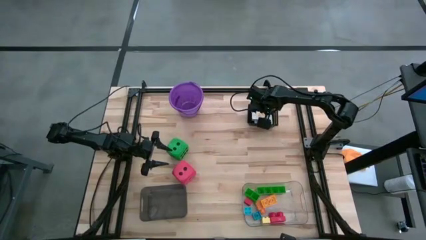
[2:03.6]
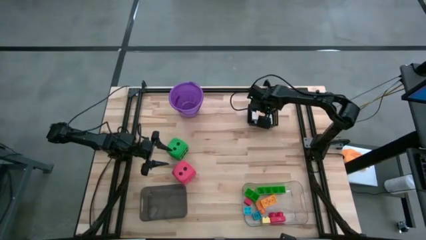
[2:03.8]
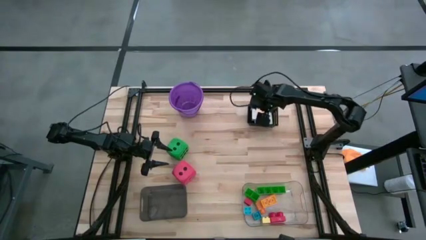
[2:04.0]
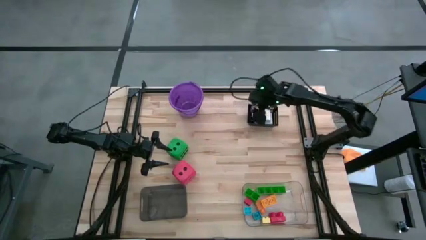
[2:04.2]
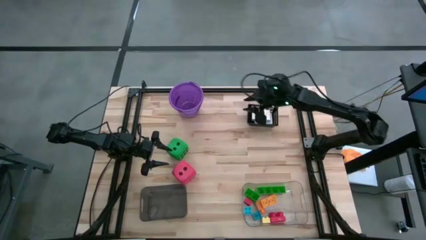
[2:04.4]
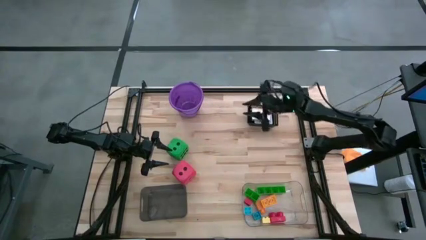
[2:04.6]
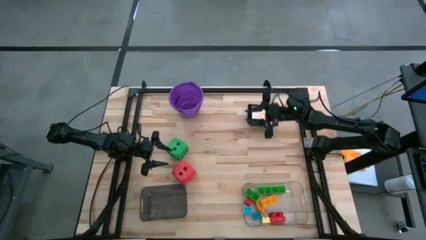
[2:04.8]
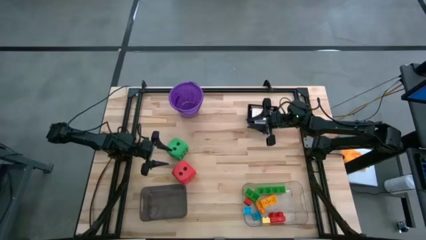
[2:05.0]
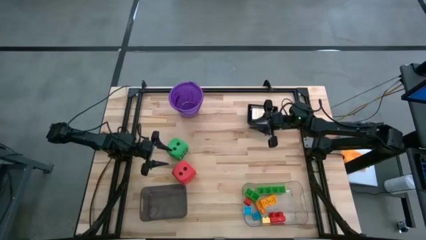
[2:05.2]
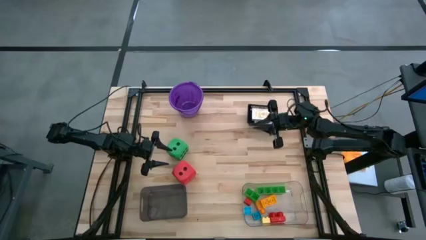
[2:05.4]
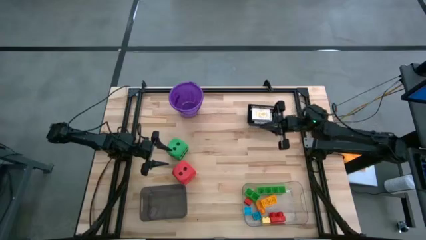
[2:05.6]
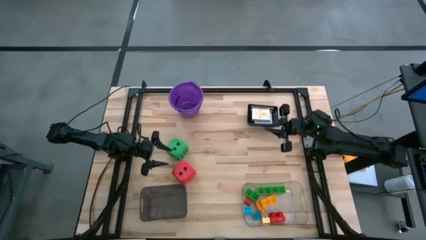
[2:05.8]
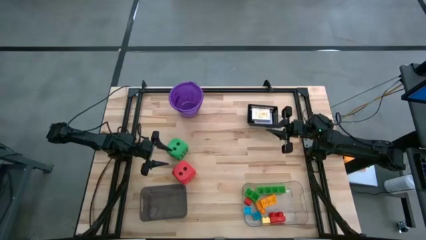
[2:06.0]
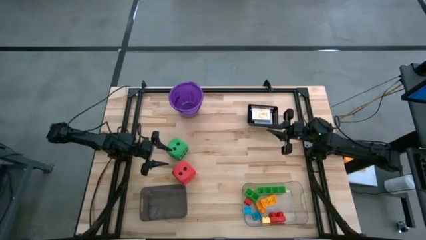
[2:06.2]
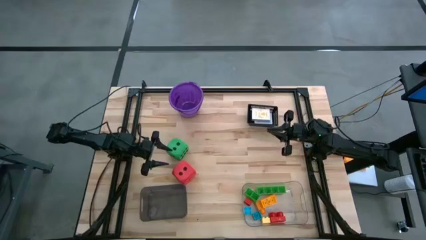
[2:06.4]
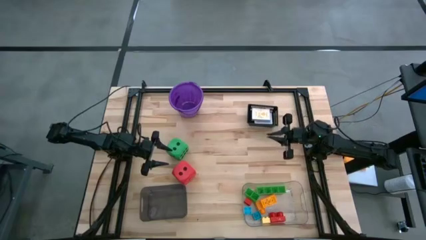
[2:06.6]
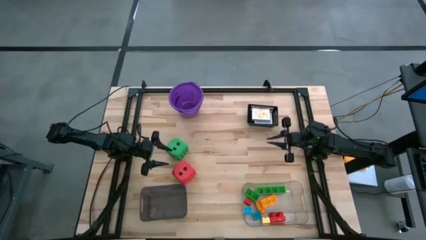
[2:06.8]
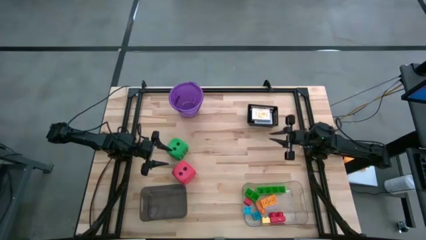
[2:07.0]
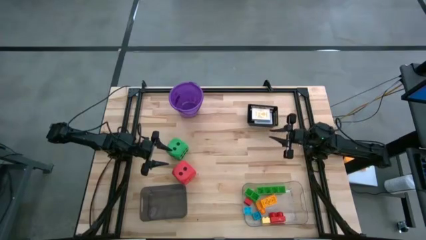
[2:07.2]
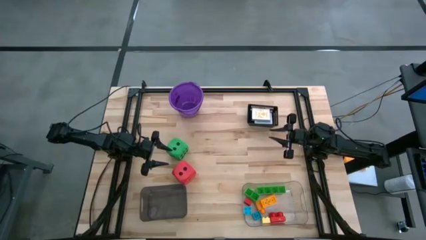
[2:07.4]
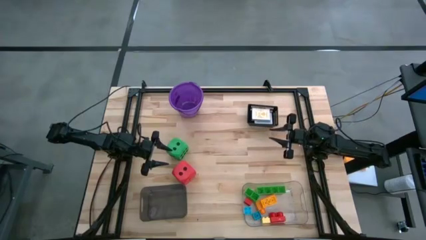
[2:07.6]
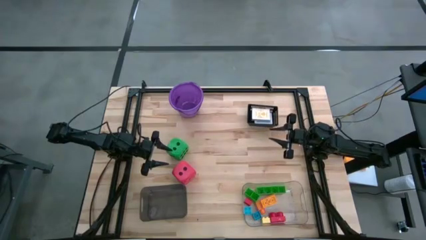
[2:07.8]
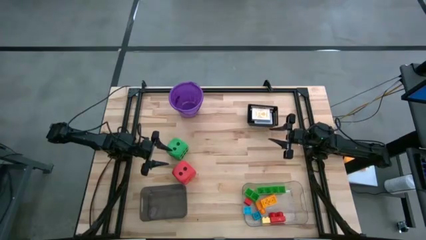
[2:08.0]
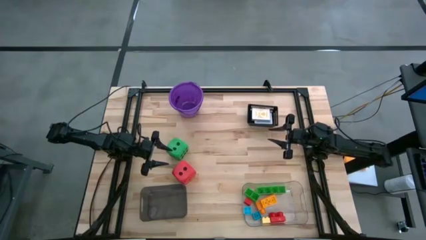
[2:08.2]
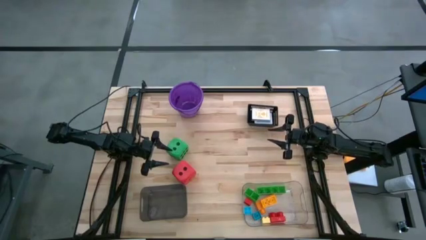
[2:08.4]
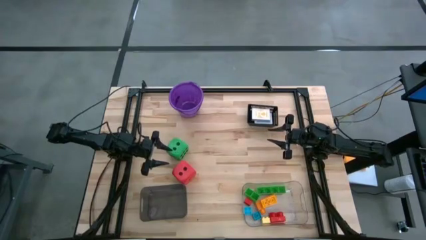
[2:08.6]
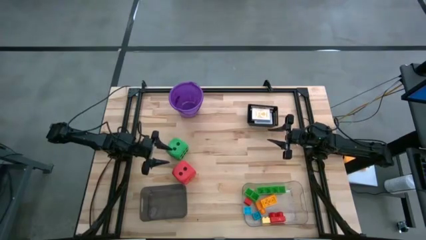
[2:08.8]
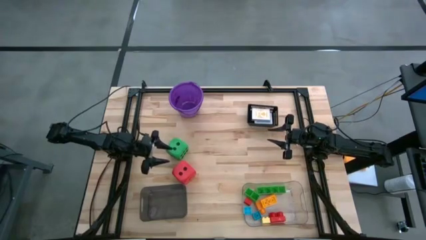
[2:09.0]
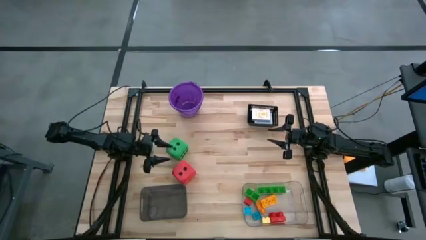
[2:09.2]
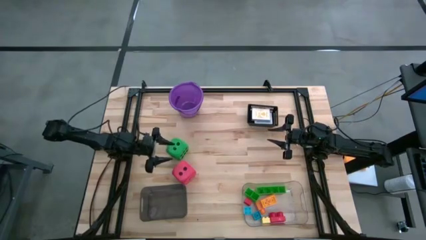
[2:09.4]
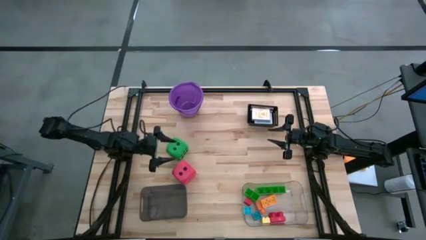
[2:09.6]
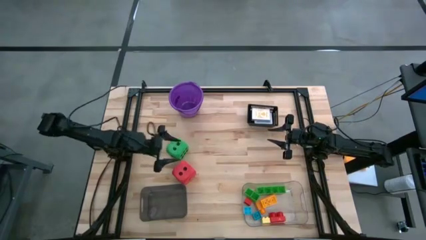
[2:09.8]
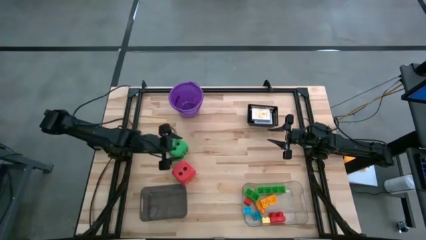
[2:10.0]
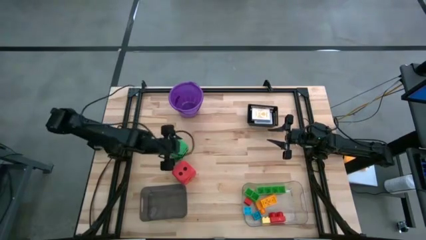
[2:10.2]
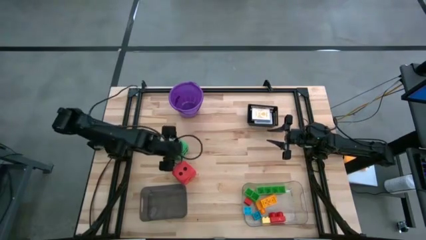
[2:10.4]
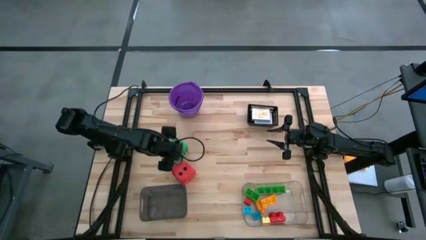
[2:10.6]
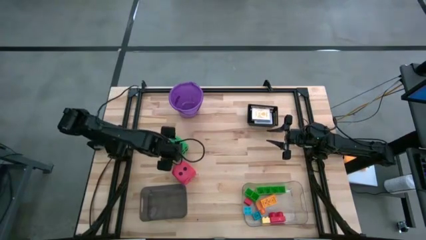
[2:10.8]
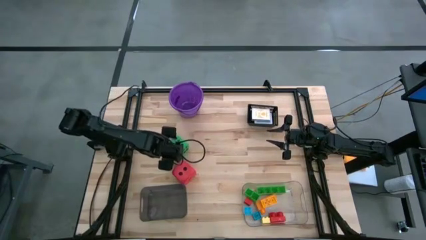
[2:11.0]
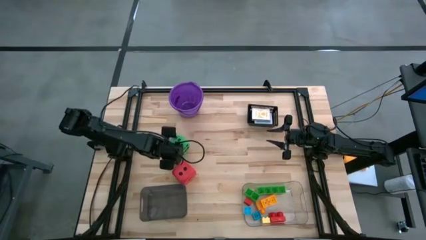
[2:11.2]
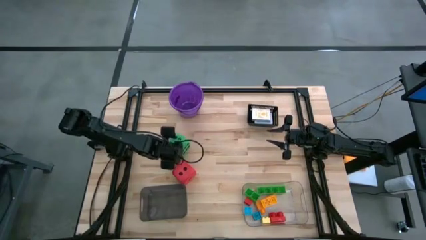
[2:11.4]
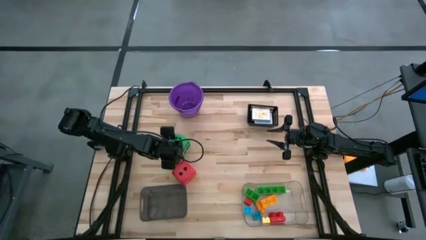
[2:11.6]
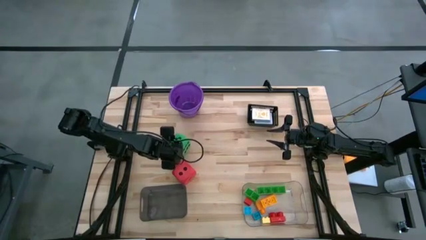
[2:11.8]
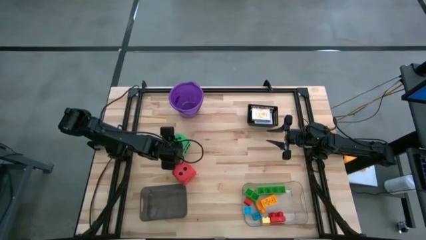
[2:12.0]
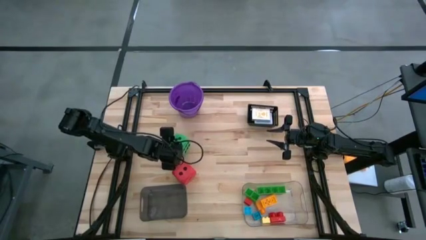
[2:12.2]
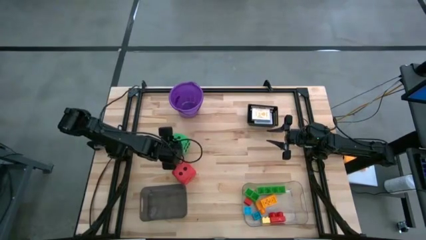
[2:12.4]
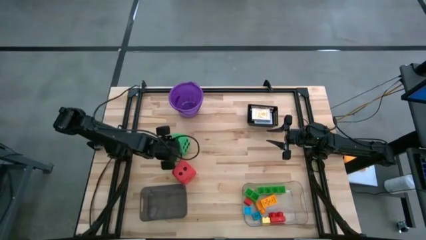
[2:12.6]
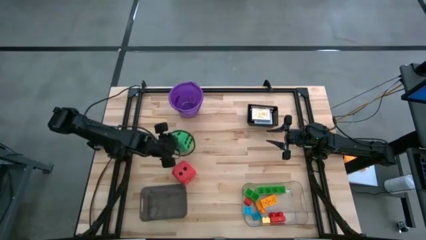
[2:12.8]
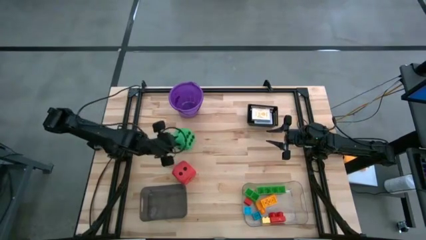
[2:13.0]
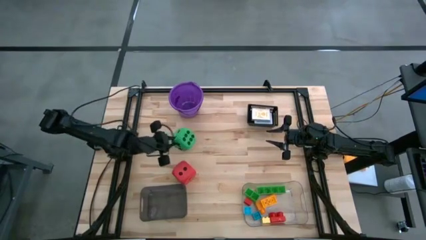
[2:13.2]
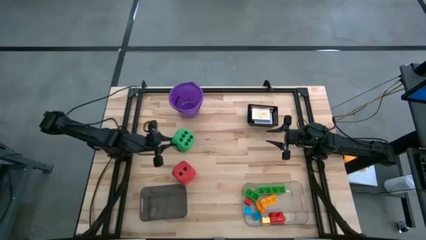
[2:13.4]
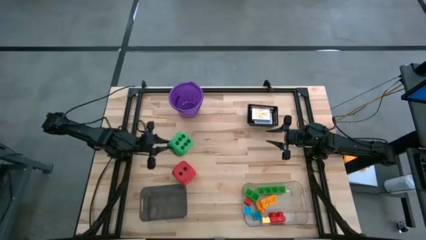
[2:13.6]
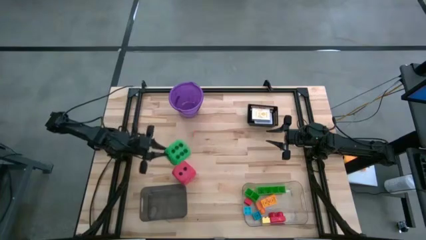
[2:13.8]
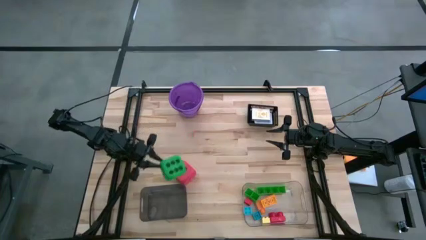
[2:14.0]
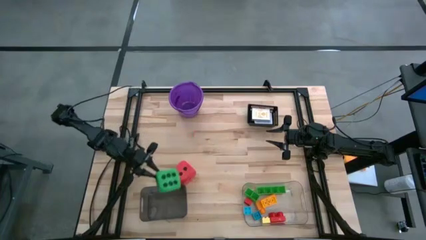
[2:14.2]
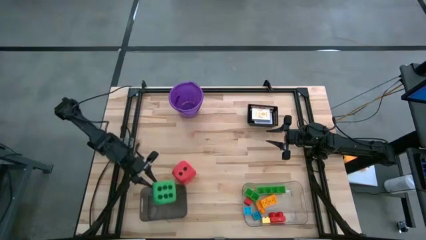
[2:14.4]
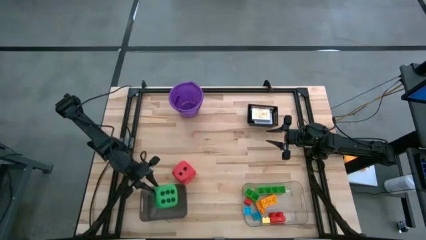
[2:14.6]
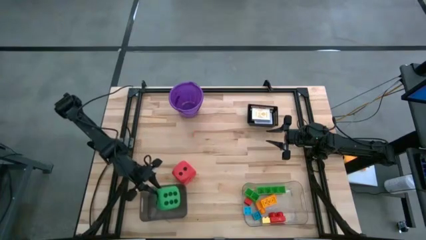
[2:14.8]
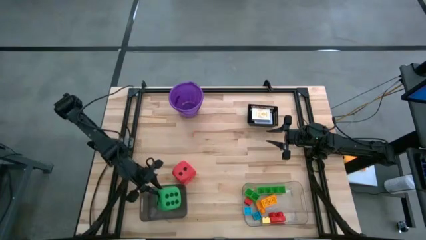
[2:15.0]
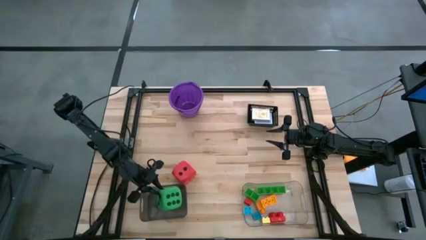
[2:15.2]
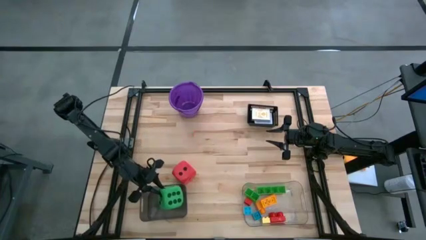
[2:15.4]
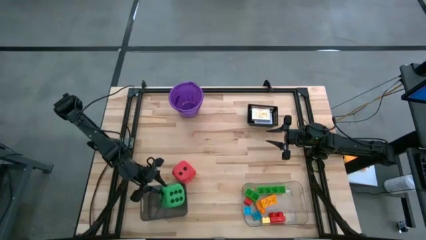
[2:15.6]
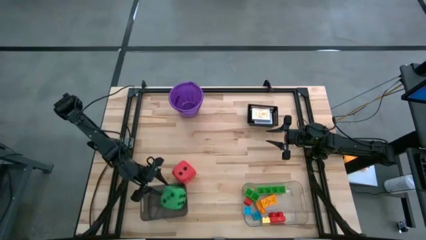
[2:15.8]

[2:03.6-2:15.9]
Task: Pick & Place Toys
Put the green dice into the black bin

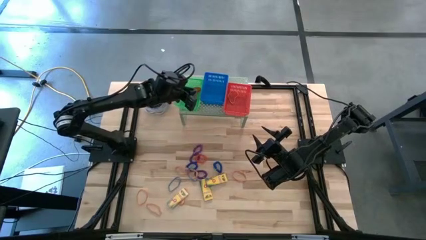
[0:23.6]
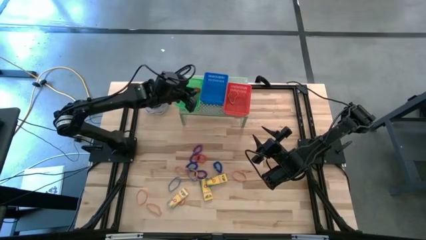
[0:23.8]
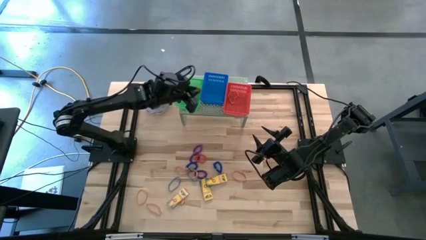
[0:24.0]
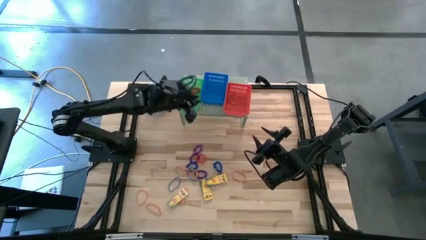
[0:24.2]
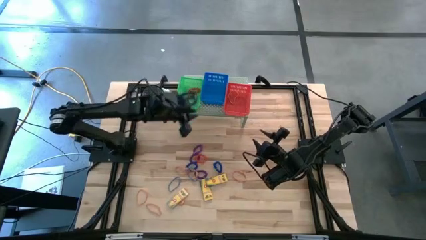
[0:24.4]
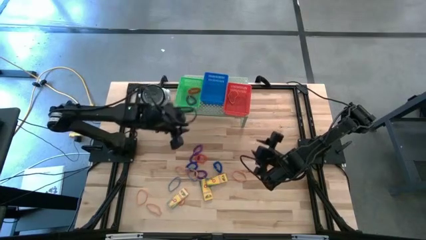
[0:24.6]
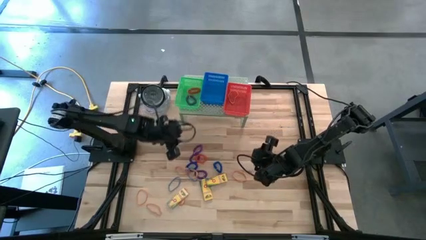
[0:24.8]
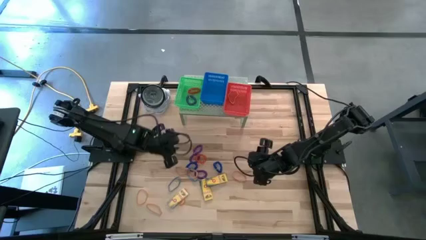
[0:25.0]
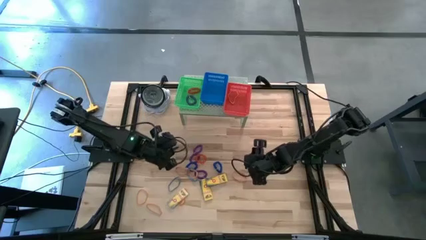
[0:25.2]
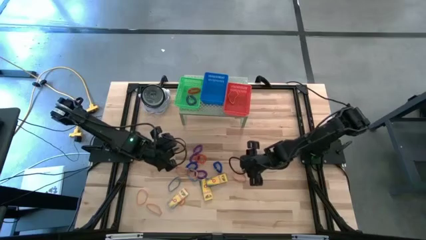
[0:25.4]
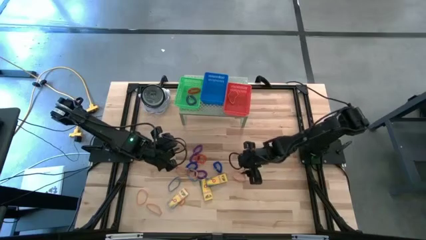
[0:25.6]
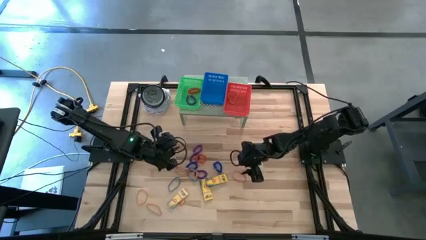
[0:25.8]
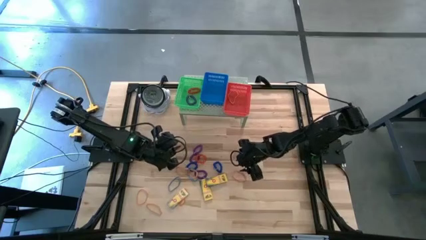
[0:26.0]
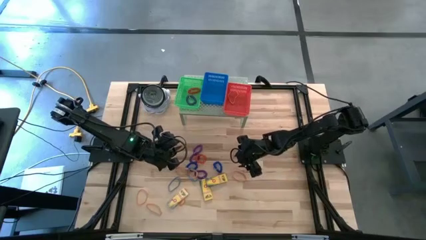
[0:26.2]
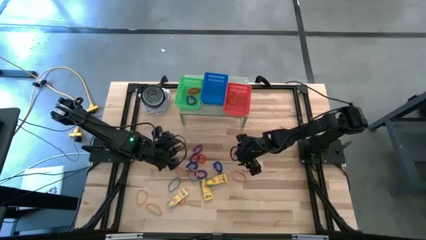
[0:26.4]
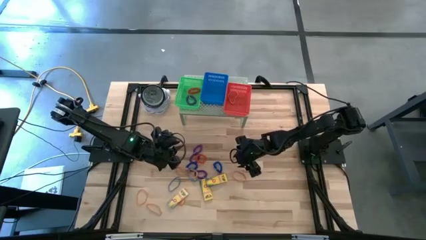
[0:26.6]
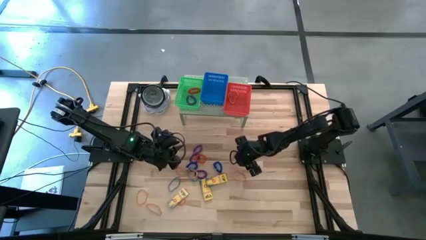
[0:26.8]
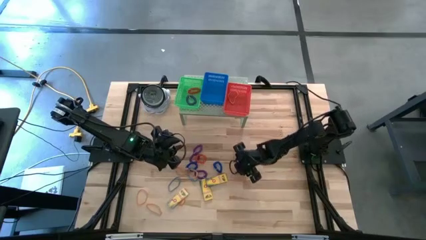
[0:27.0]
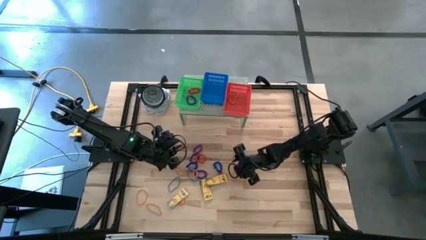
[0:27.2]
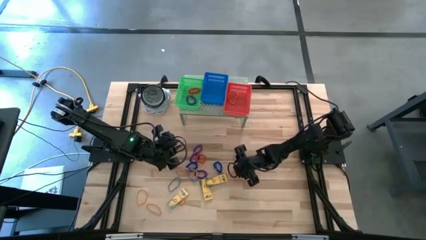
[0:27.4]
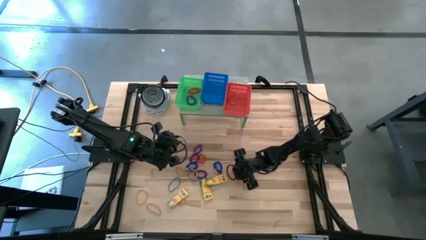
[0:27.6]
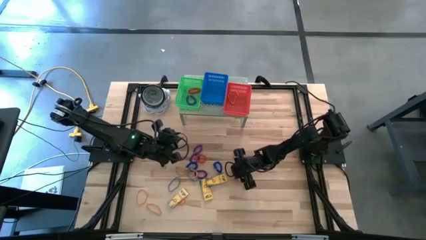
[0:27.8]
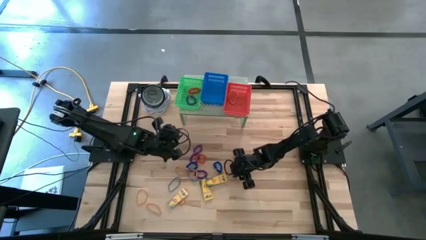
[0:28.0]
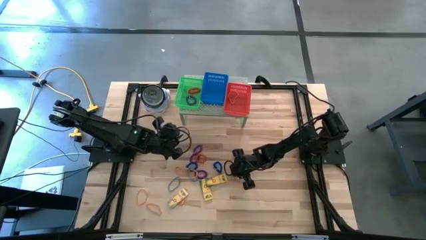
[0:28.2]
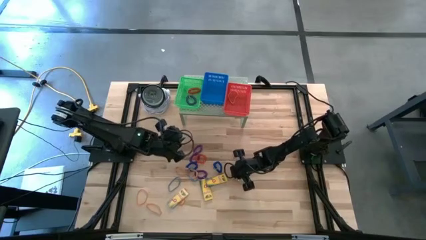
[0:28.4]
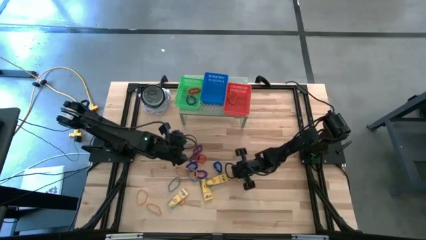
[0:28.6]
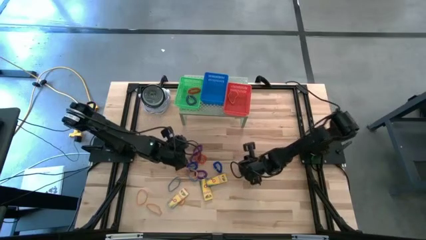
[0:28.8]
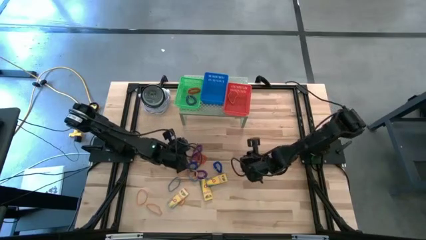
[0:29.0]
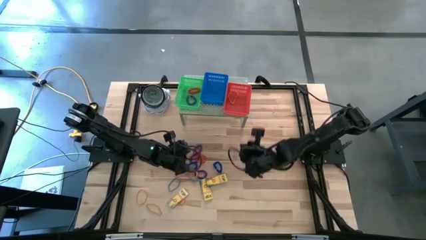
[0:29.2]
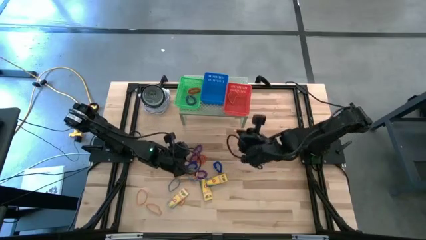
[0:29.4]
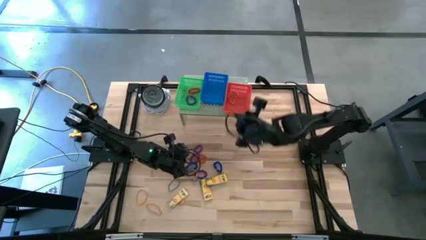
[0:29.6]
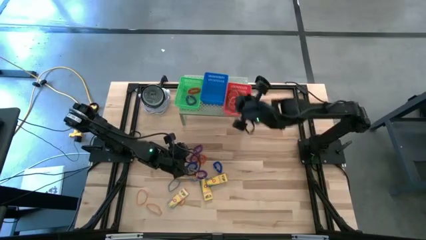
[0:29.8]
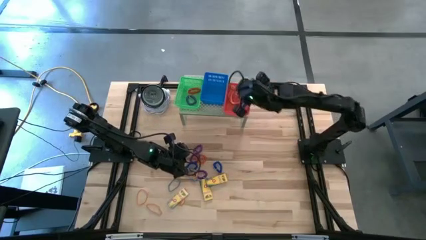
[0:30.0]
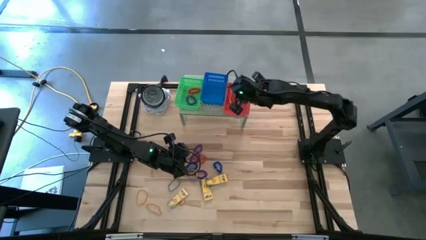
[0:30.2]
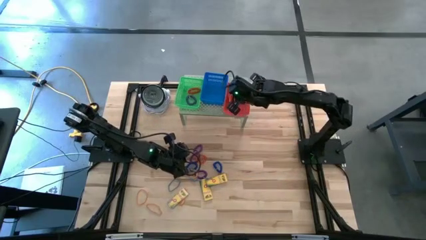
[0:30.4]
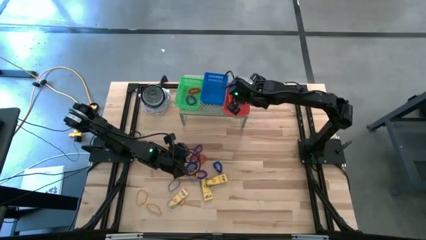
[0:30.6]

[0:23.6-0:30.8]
Task: Pick & Place Office Desk Supplies
Put the orange rubber band into the red bin on the shelf
